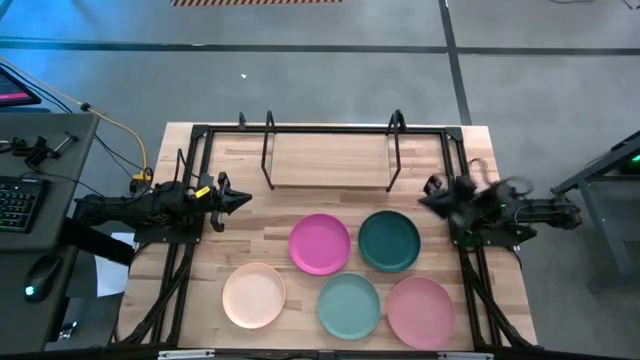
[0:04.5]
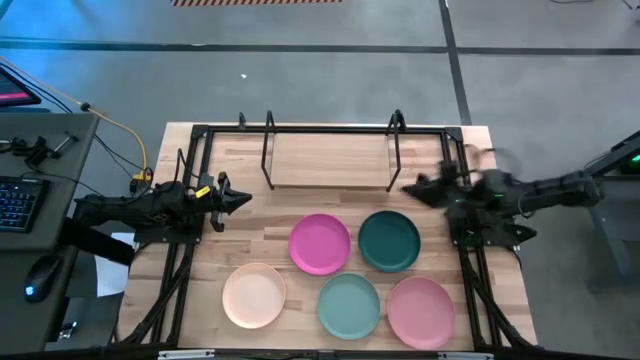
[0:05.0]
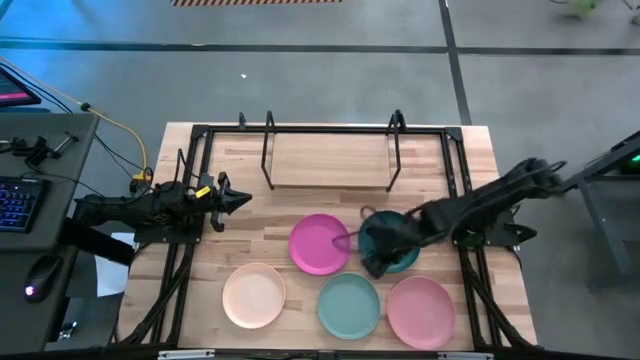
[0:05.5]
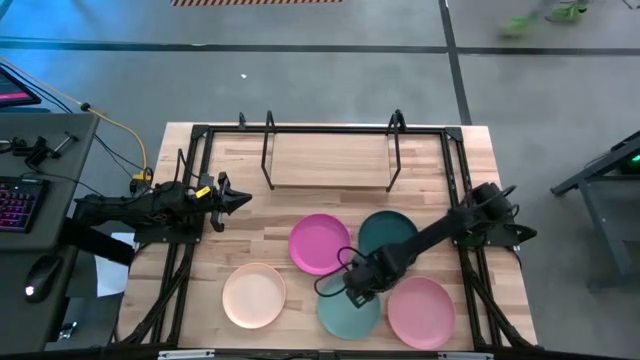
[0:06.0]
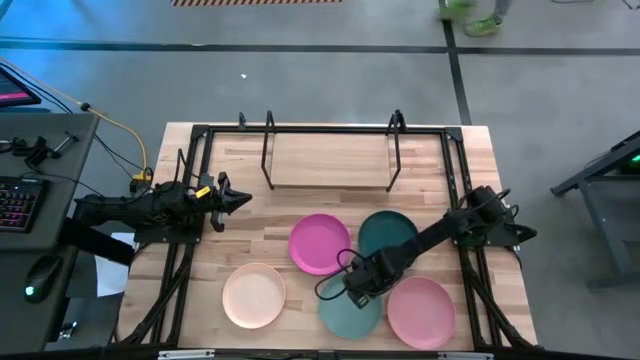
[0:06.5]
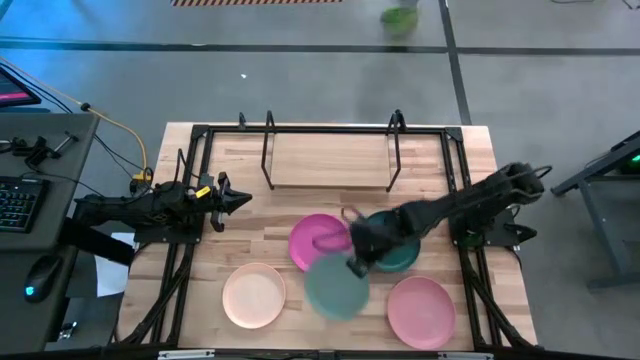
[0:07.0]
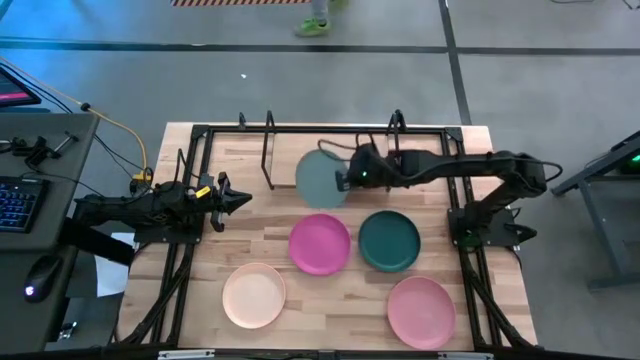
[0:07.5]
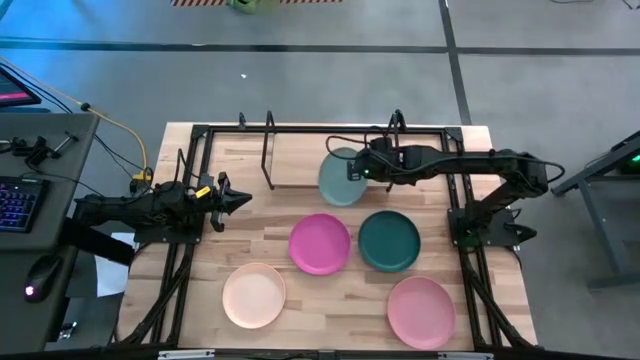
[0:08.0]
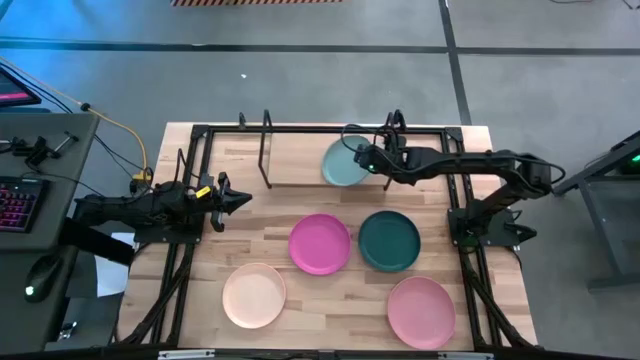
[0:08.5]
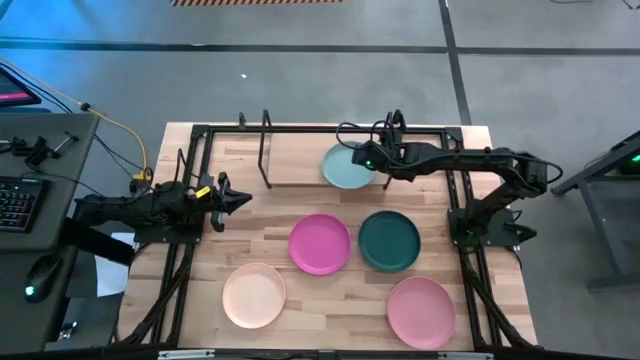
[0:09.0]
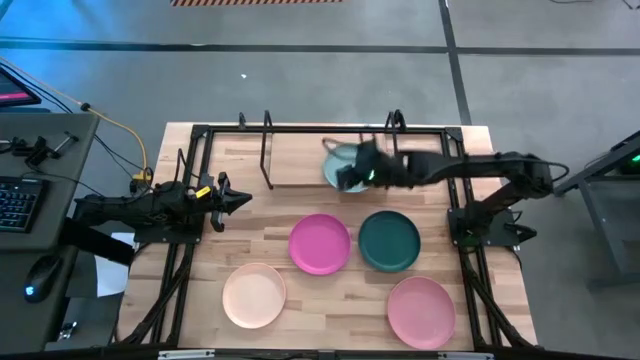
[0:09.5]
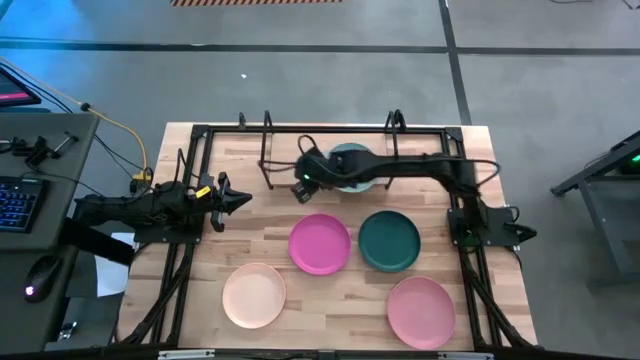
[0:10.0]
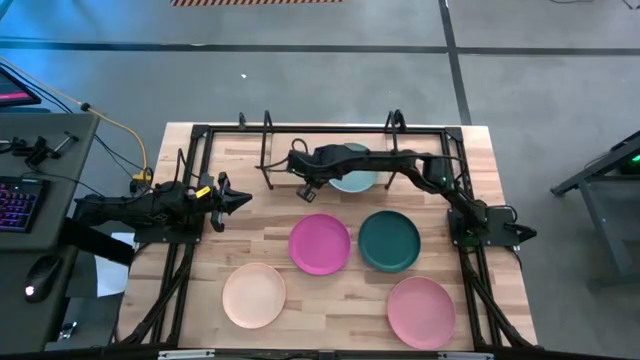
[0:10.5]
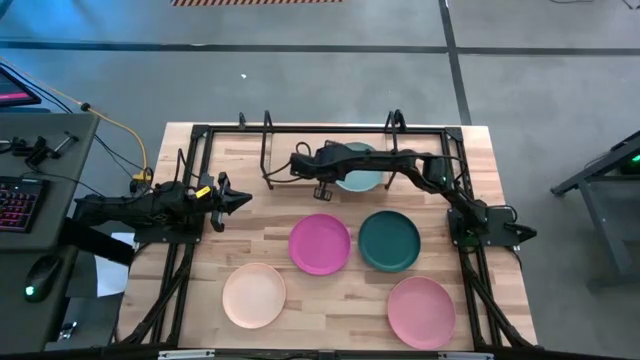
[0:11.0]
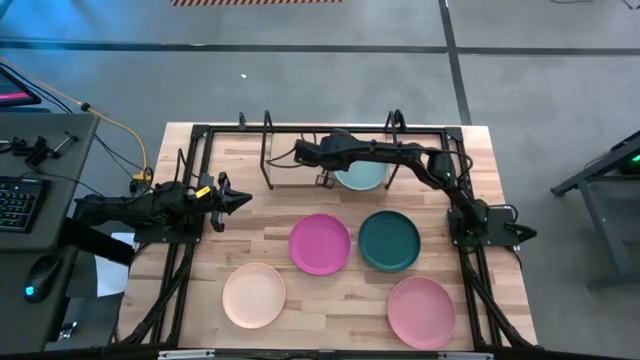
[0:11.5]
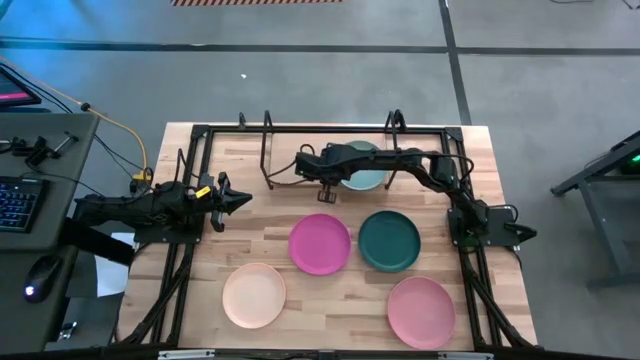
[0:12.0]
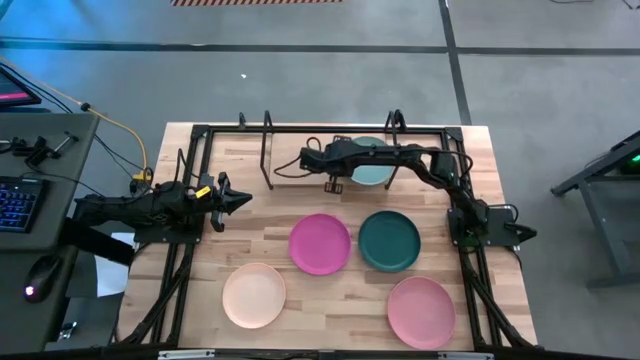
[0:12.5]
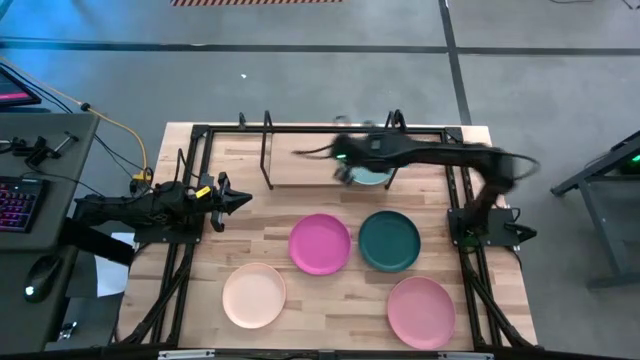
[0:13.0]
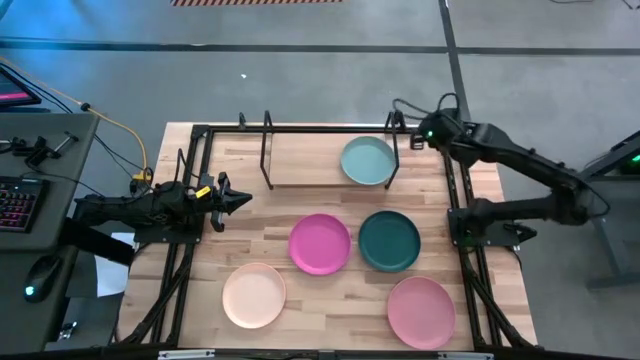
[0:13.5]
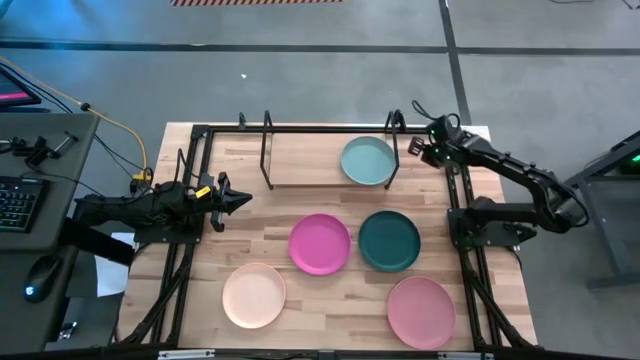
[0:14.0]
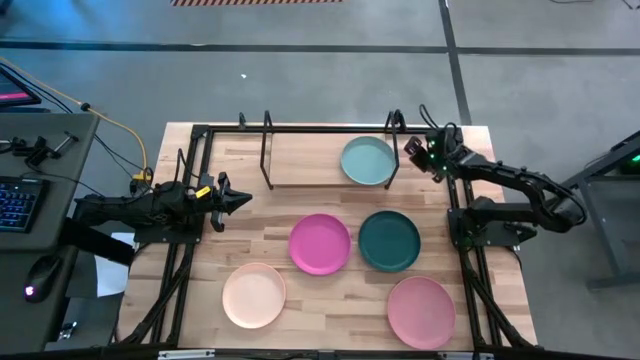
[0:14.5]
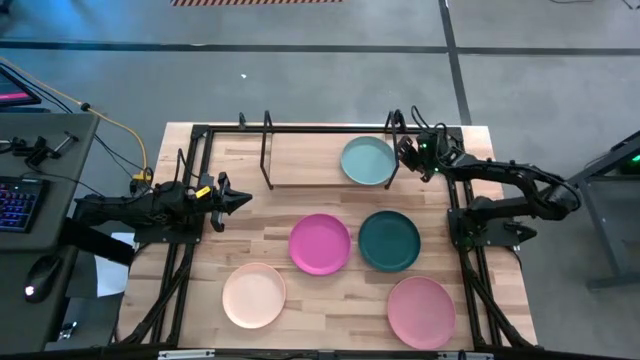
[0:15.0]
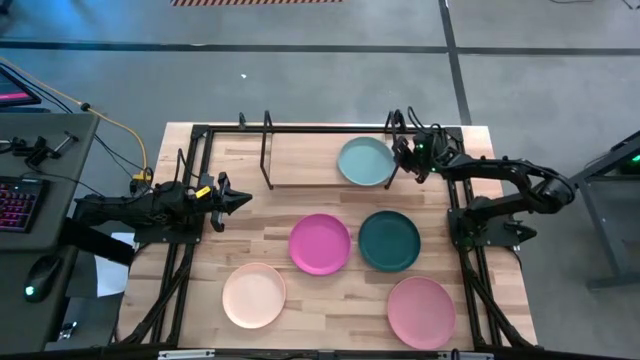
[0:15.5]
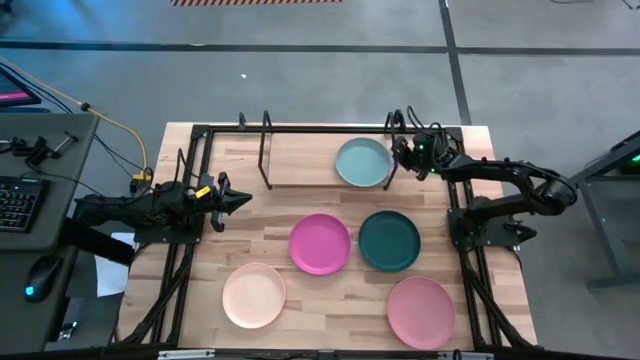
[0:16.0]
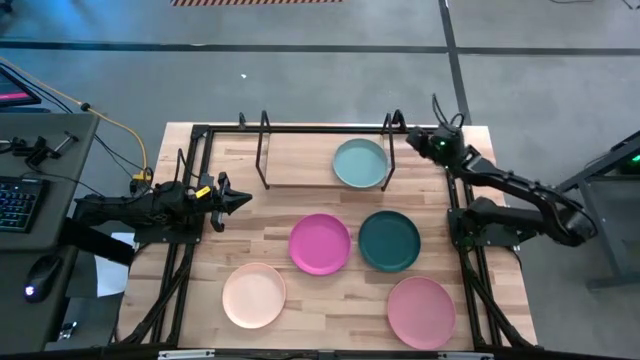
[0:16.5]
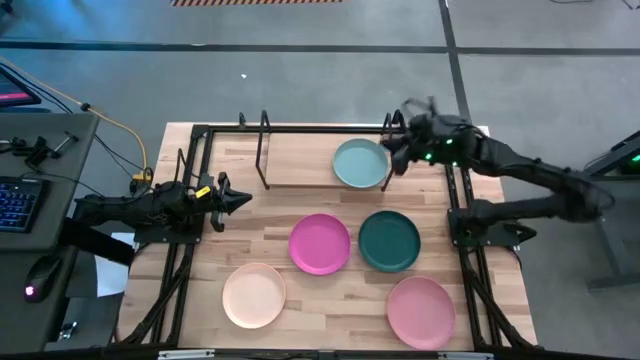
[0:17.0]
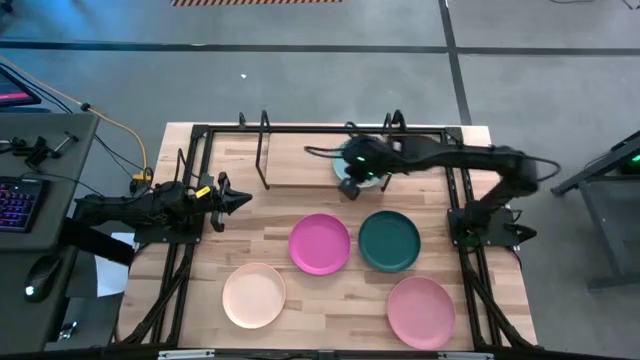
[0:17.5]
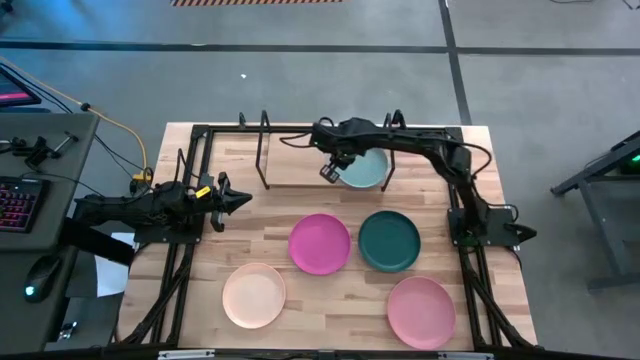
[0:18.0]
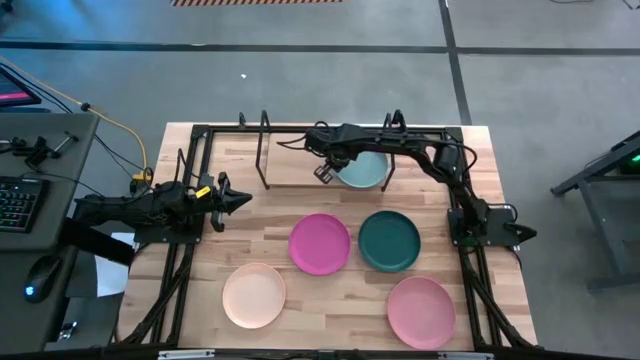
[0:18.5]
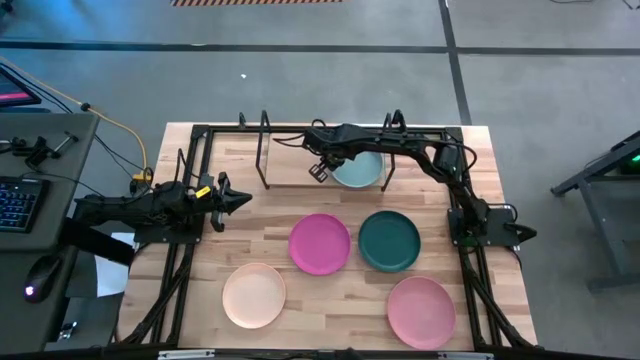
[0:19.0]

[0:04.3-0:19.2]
Task: Place and stack plates onto a shelf
Put the blue plate on the shelf

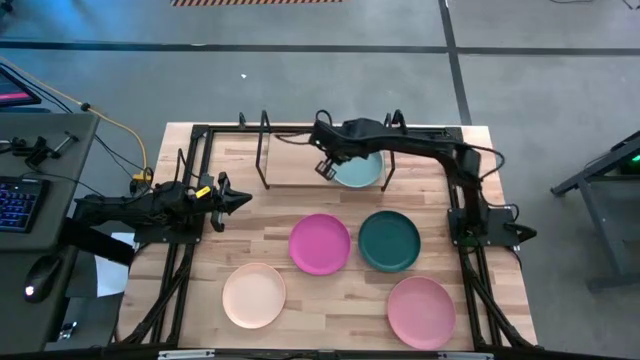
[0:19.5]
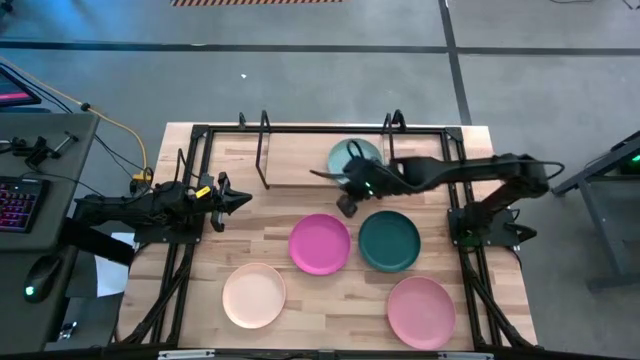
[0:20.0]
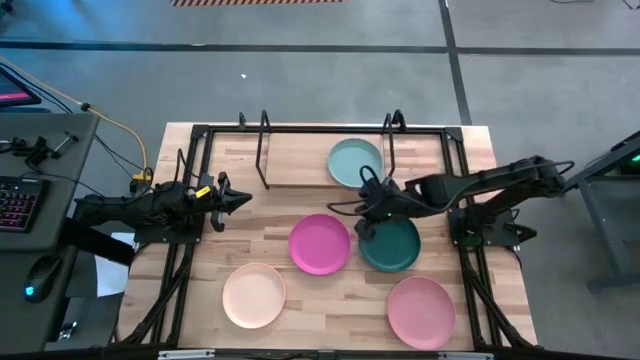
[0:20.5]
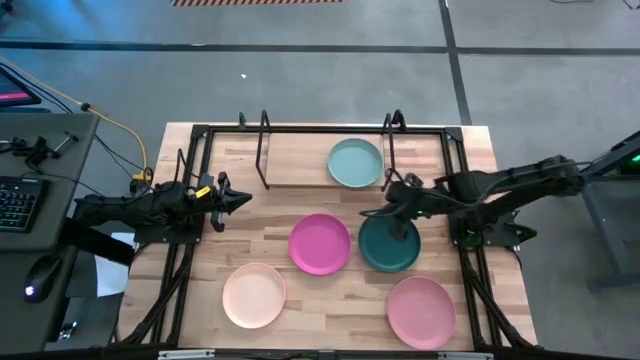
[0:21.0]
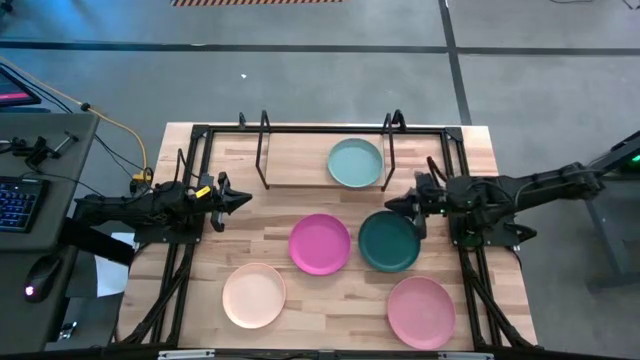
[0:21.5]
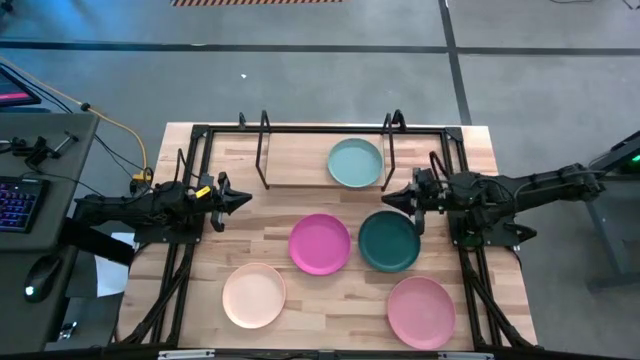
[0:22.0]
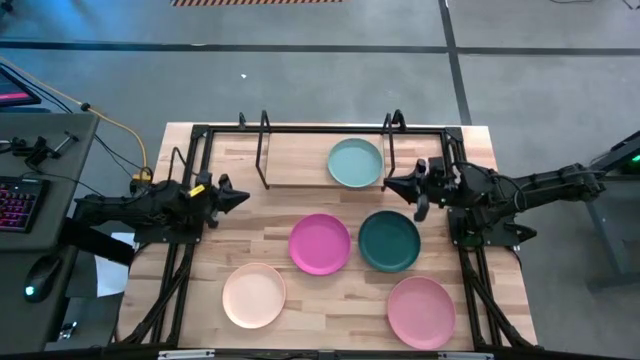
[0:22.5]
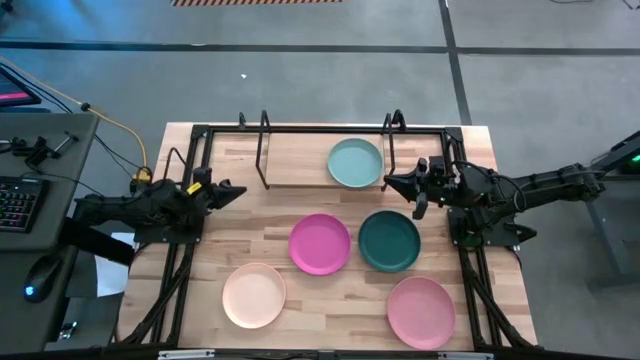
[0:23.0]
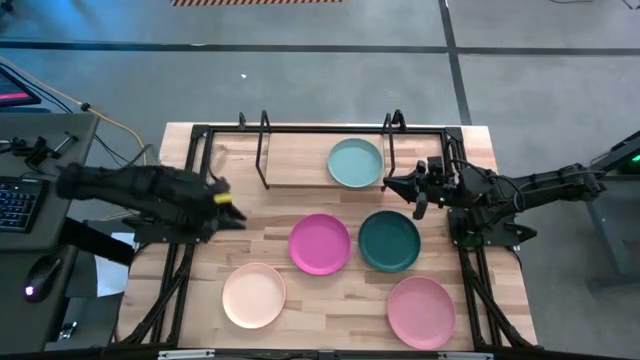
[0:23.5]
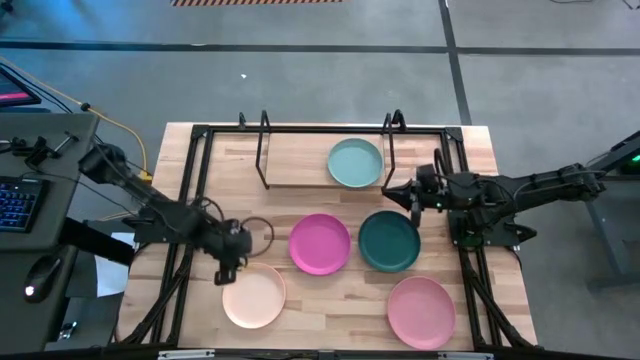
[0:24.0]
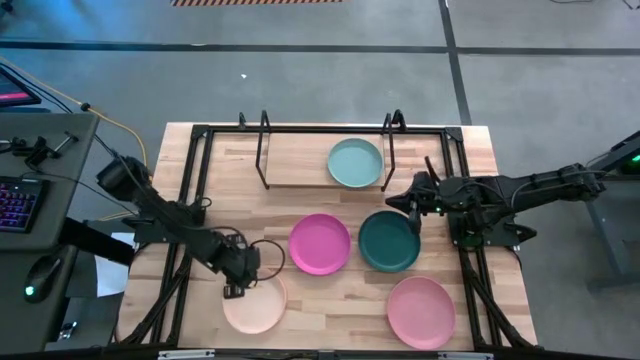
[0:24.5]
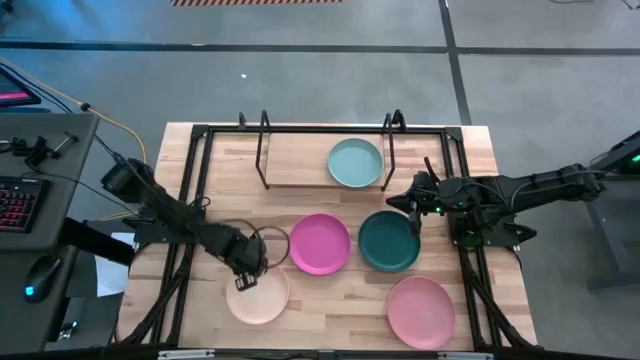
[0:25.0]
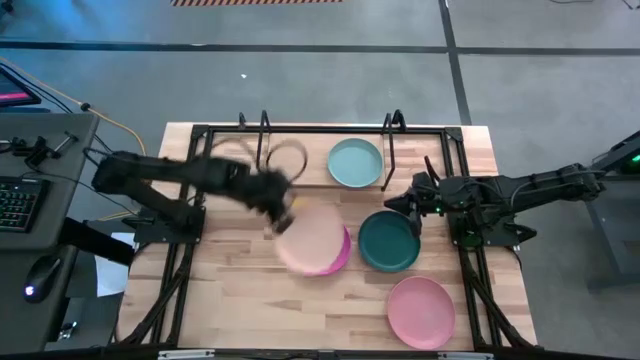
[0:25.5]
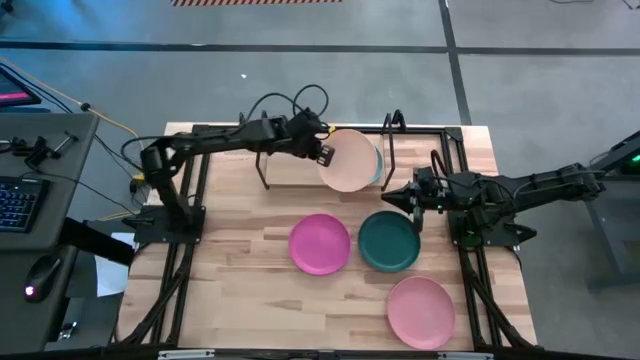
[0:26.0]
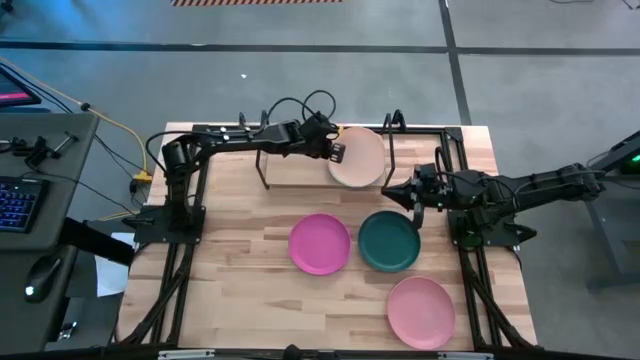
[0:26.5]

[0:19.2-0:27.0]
Stack the orange plate on top of the blue plate on the shelf
